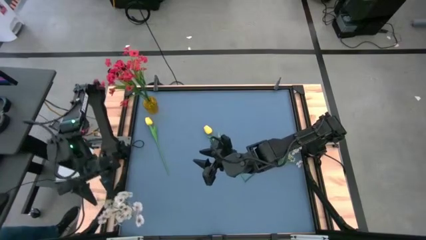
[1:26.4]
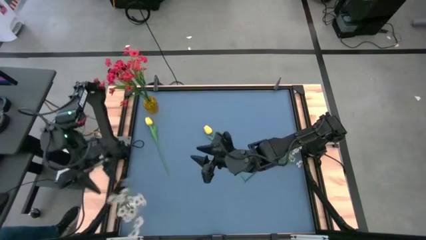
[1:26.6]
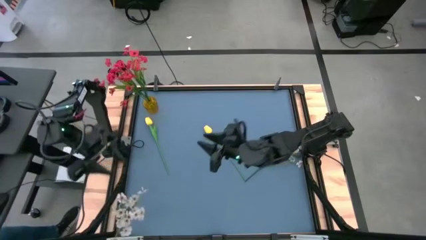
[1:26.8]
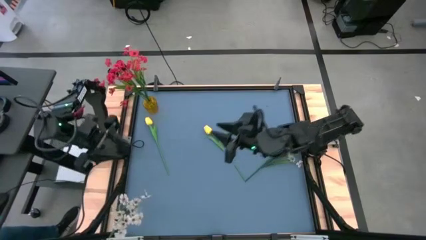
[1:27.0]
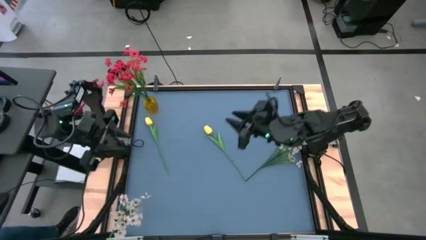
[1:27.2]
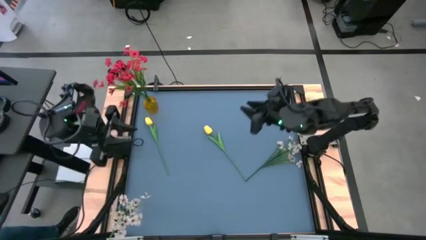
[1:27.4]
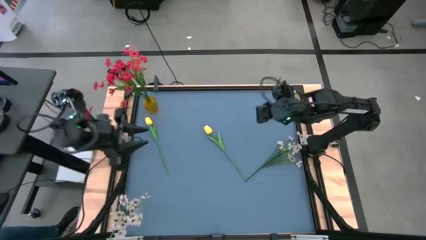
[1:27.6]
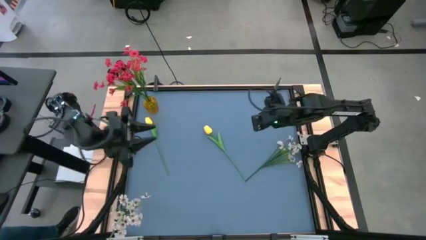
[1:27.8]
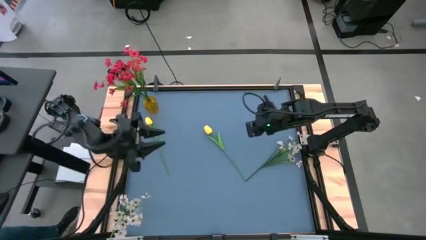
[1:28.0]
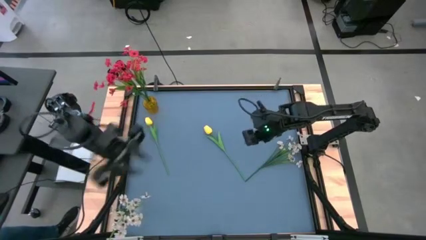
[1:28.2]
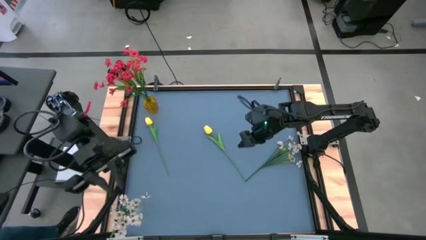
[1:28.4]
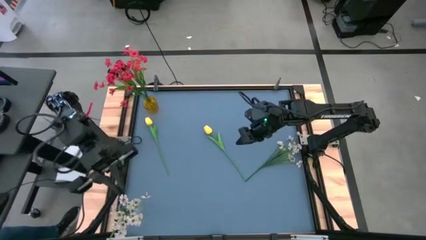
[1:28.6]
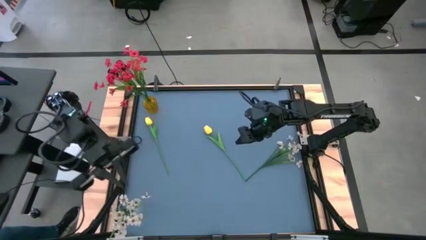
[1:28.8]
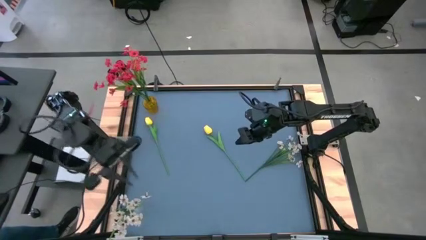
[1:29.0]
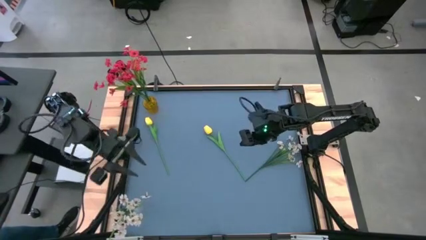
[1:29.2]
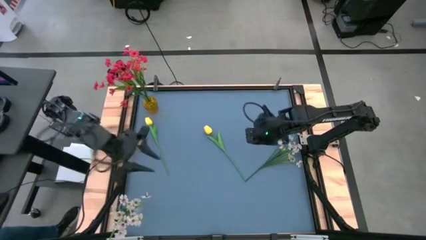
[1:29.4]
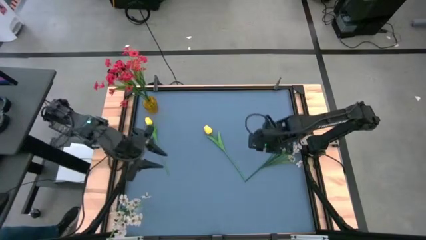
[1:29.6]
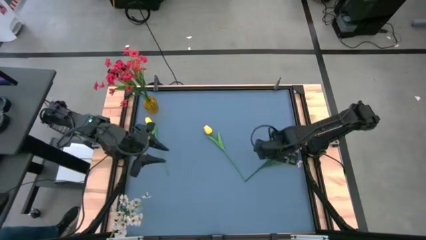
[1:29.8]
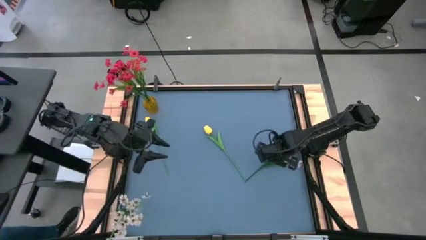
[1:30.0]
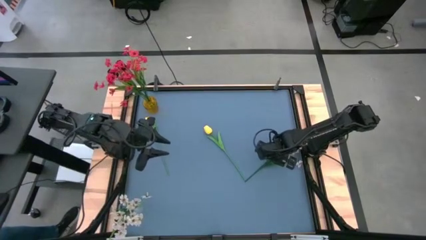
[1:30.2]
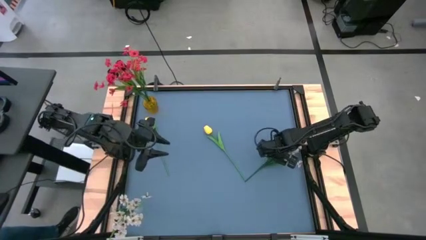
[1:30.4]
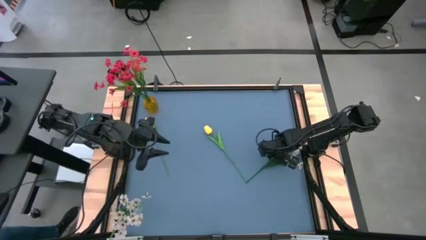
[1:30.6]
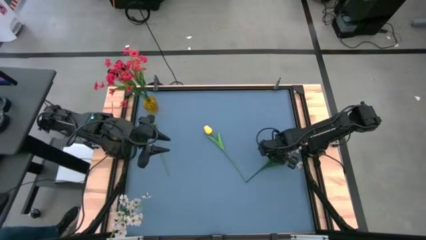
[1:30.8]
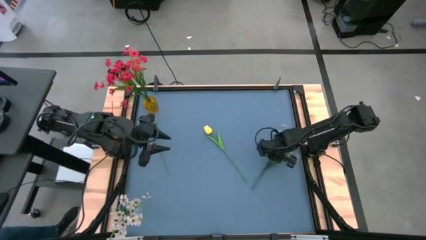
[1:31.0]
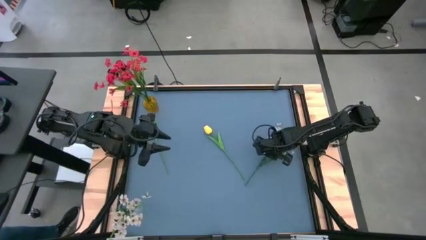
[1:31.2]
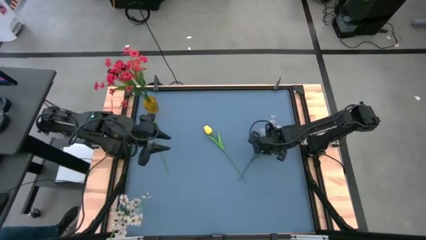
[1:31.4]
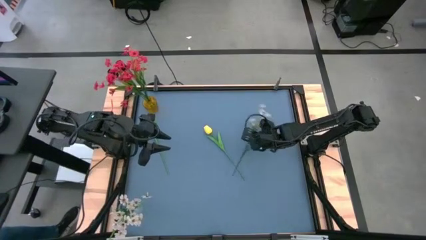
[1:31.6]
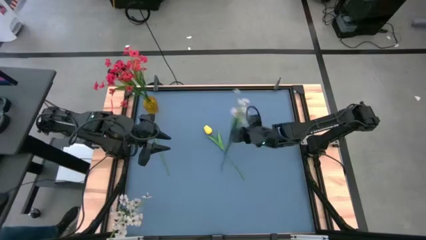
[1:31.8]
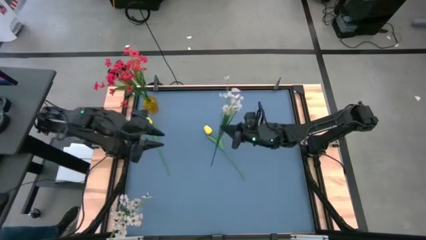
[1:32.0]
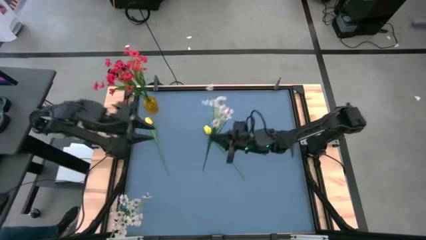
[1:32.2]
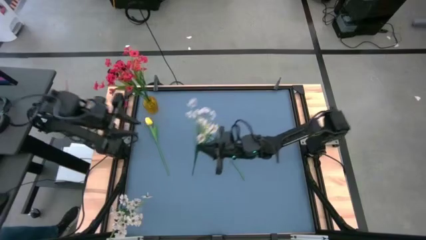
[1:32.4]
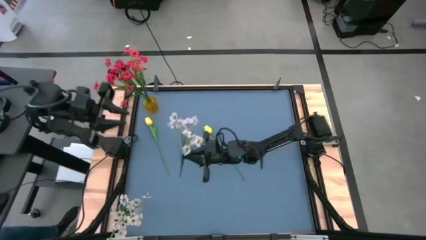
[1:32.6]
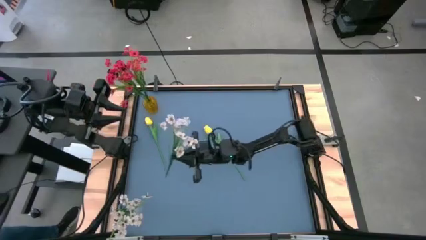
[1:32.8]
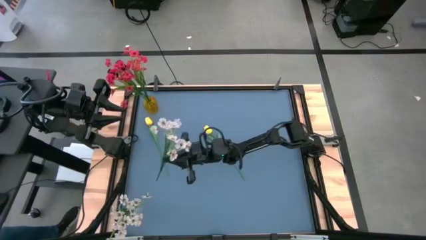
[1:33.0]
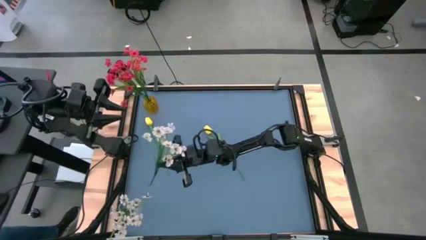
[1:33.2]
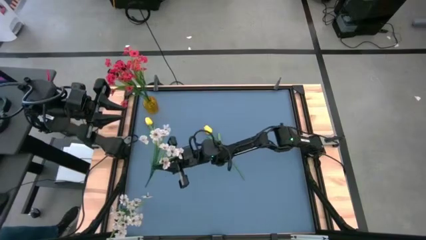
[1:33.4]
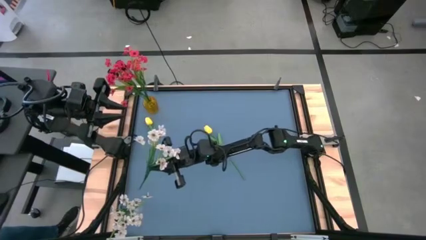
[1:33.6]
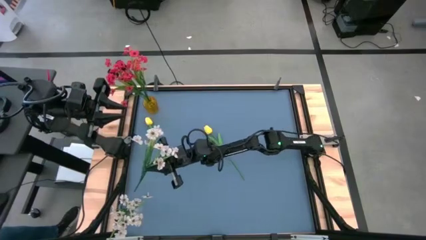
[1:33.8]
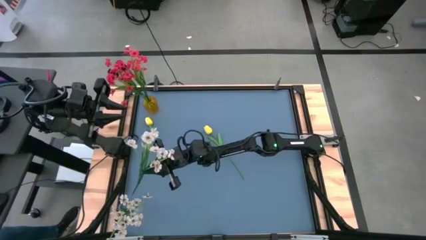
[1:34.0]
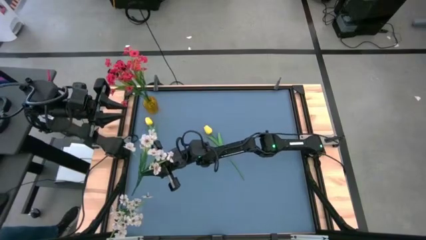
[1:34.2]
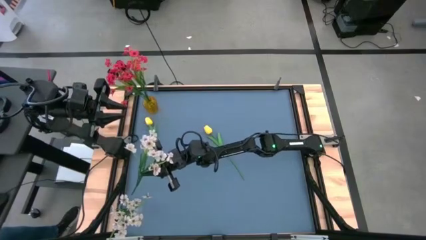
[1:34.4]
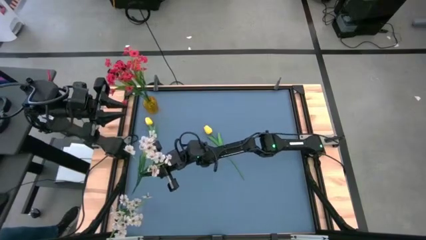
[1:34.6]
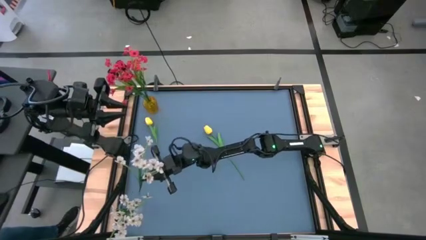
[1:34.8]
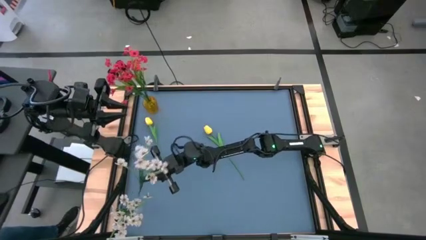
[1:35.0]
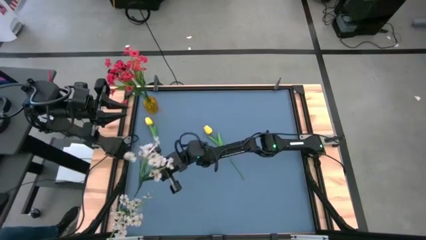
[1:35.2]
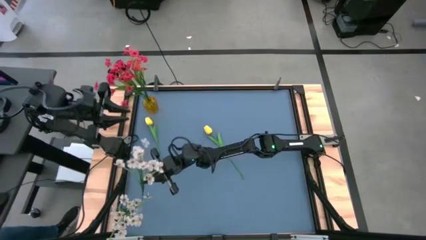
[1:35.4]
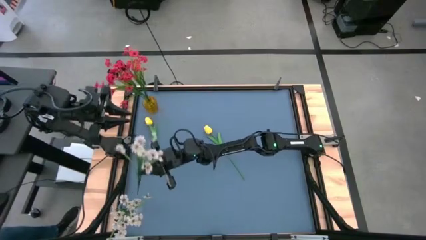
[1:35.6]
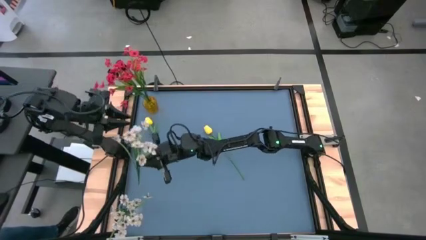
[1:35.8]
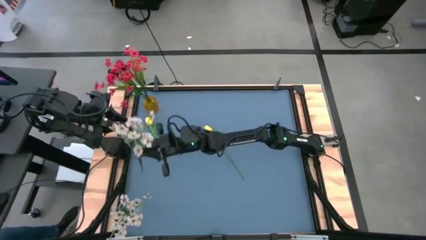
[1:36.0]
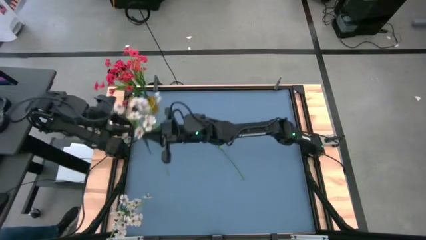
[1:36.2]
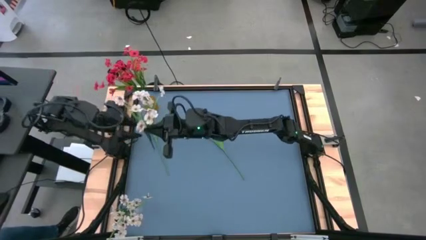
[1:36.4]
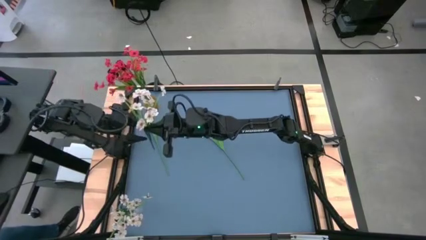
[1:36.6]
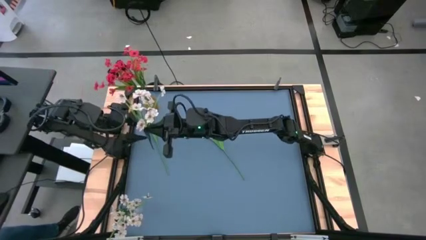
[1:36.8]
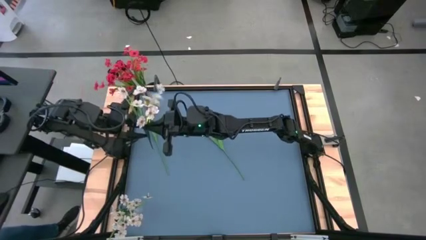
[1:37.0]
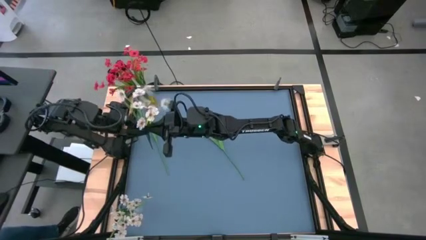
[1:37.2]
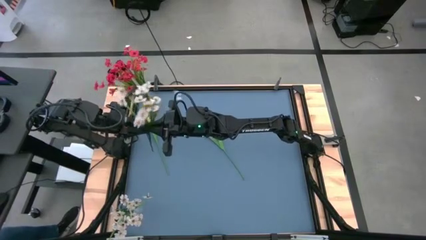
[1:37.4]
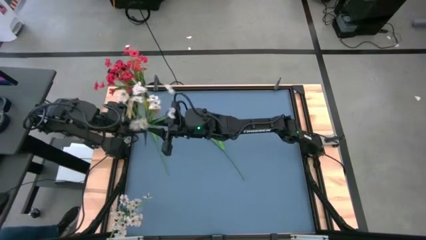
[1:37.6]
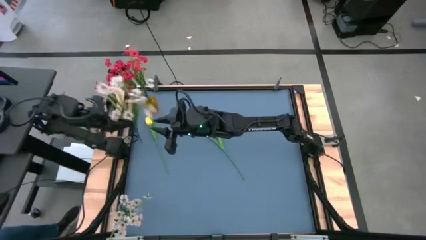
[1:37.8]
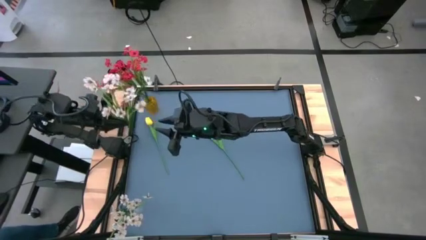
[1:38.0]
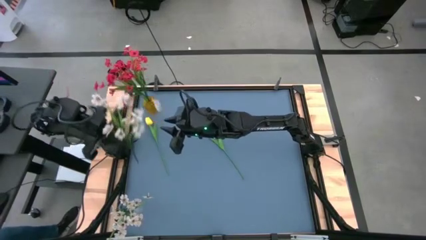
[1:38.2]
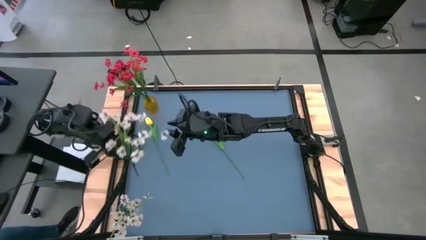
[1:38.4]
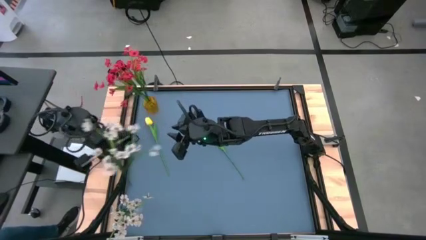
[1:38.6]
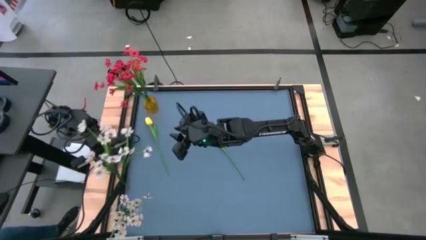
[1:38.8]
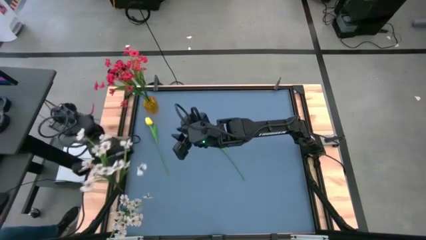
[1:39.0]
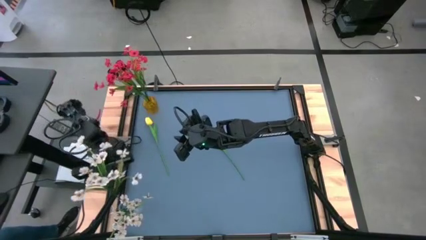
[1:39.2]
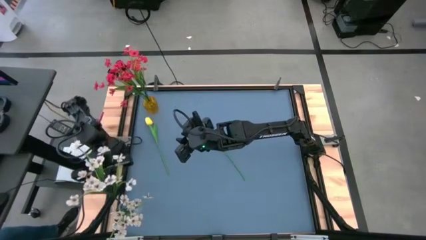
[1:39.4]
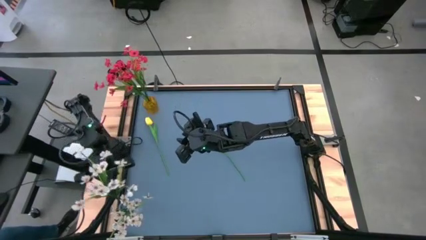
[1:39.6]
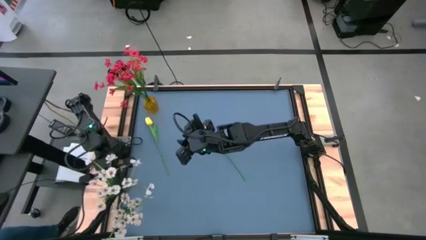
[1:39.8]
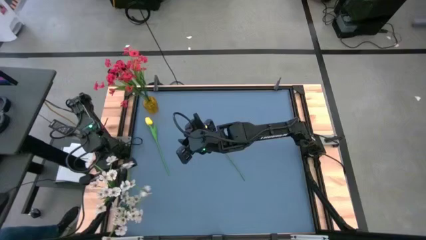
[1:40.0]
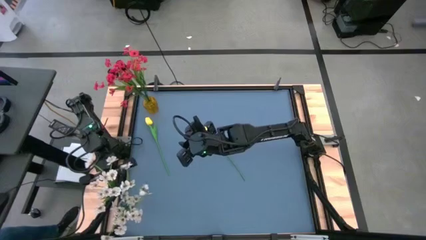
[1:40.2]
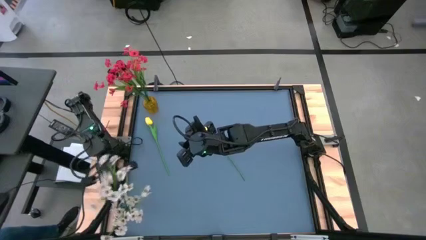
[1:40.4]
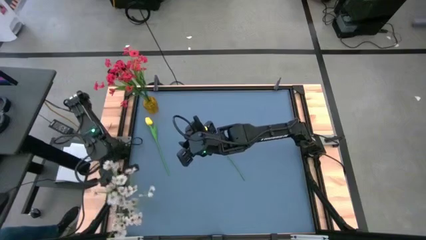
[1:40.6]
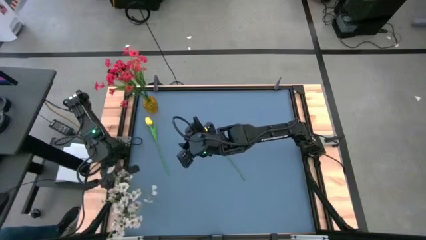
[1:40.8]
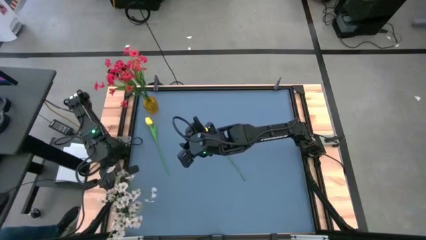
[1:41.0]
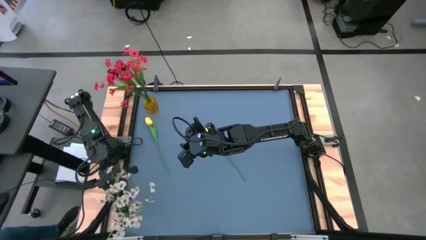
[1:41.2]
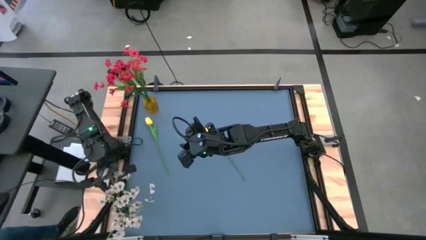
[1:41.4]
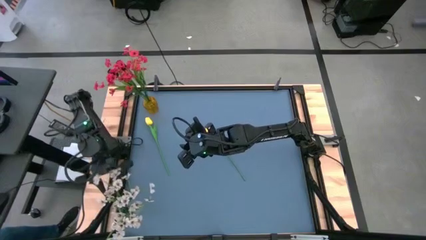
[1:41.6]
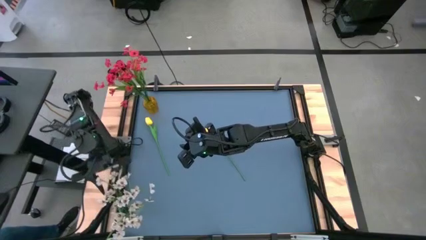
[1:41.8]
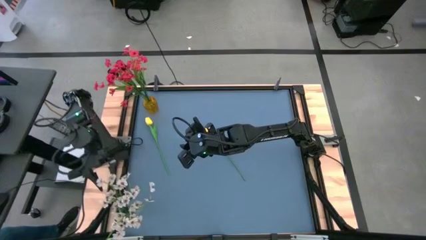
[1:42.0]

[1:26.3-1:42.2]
Task: Sort flowers into vase by color
Put the white flowers into the transparent vase
